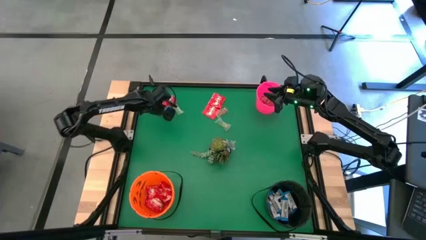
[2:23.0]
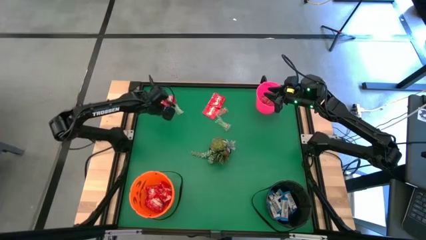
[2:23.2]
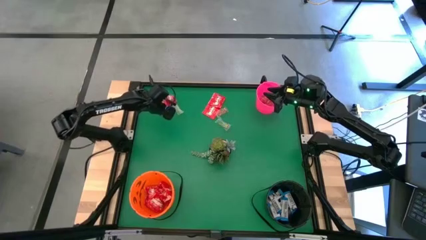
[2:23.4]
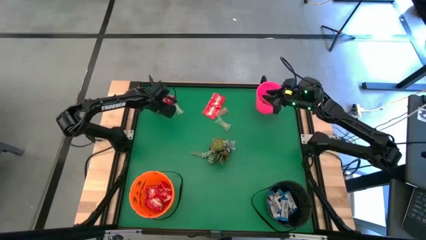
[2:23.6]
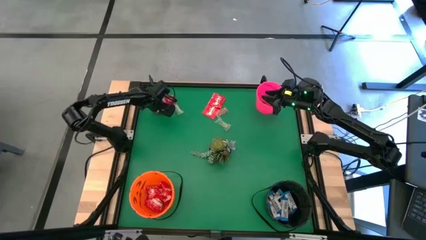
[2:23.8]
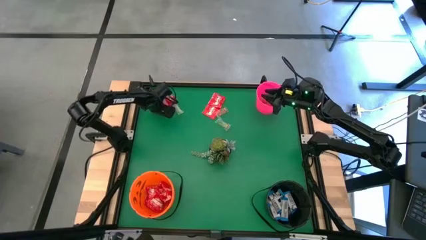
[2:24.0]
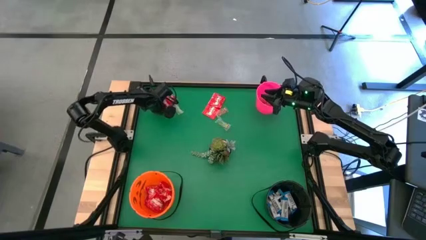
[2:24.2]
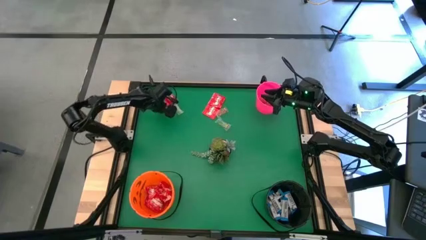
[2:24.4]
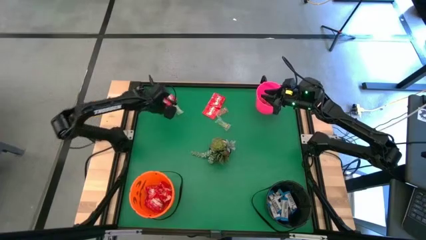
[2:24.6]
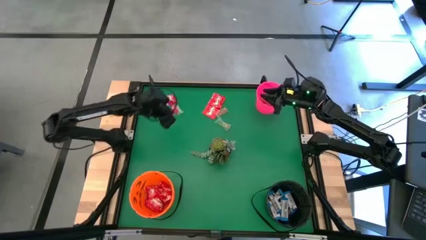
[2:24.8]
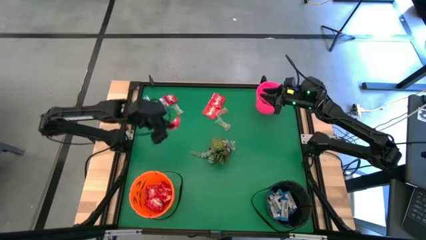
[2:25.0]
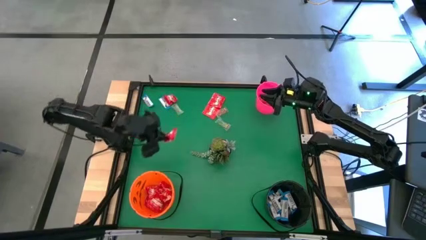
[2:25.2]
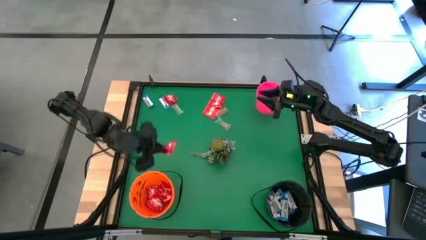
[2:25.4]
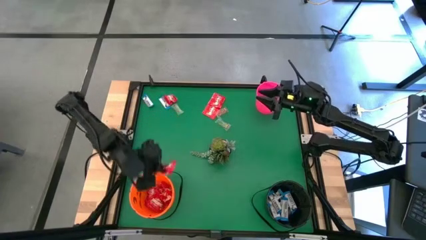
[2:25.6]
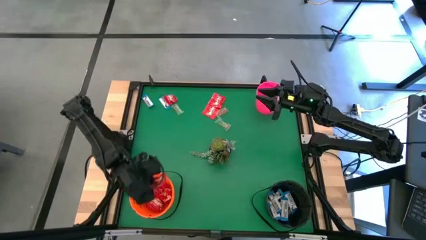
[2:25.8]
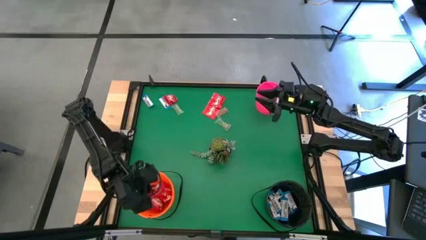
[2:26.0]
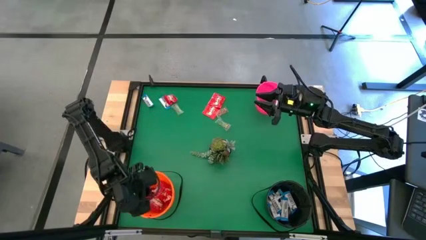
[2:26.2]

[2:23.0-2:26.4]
Task: Sort candy
Put the red candy into the orange bucket

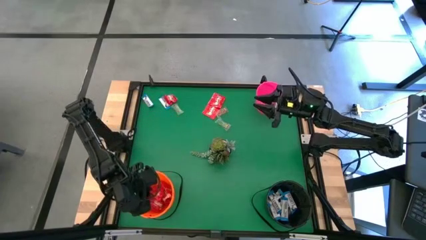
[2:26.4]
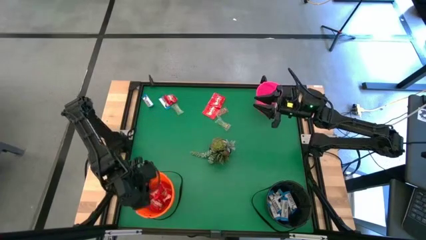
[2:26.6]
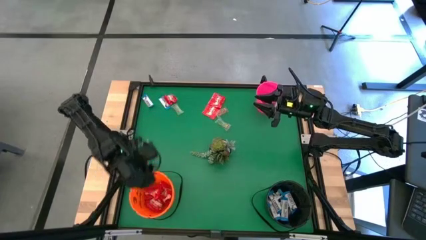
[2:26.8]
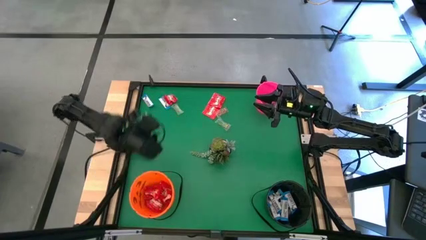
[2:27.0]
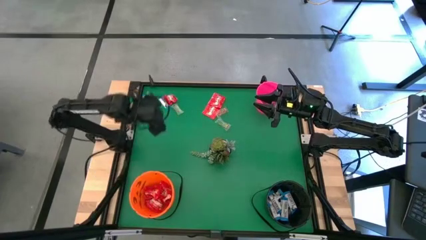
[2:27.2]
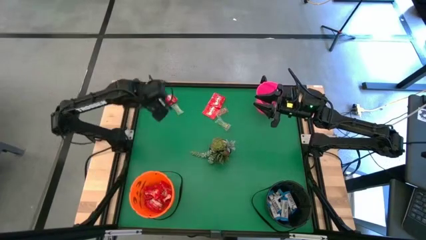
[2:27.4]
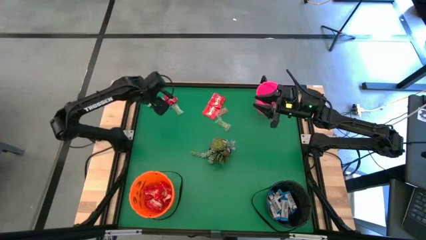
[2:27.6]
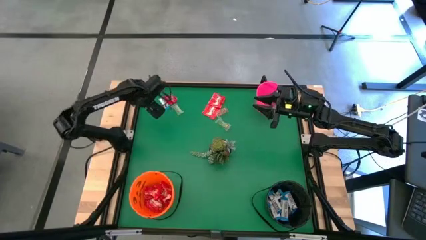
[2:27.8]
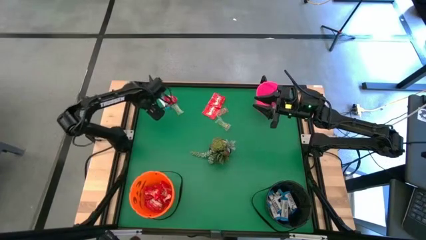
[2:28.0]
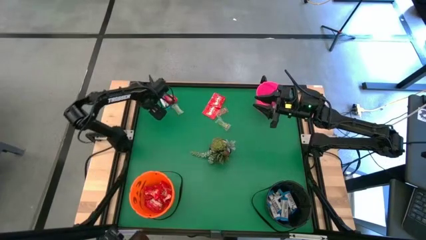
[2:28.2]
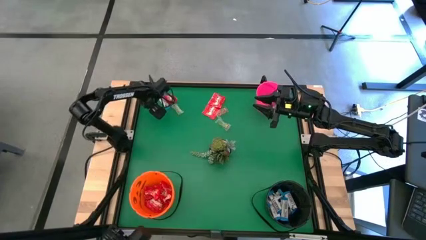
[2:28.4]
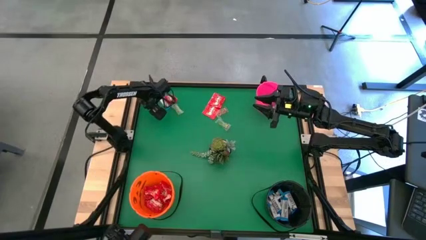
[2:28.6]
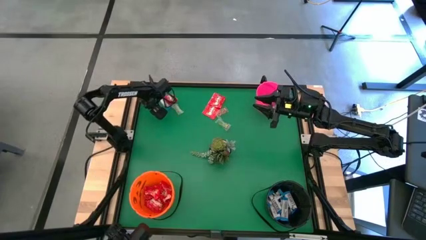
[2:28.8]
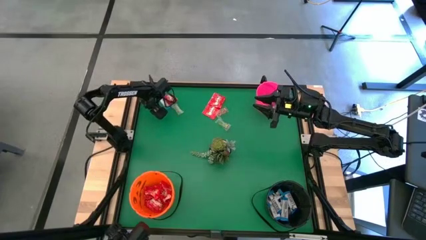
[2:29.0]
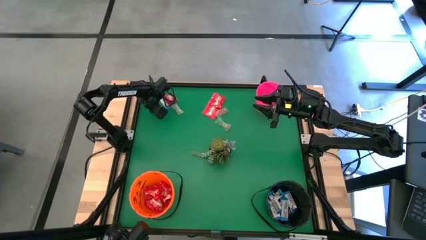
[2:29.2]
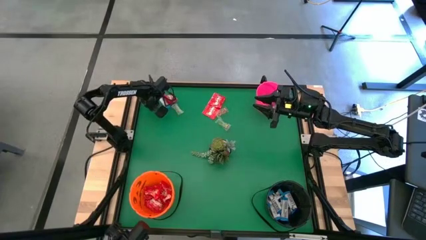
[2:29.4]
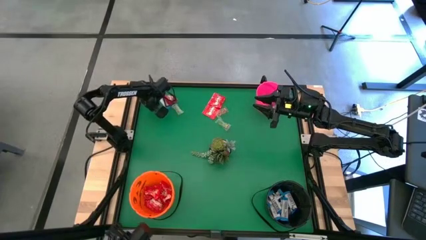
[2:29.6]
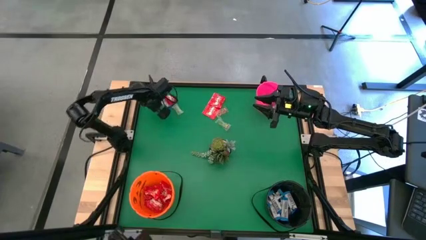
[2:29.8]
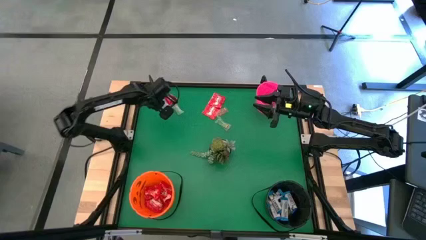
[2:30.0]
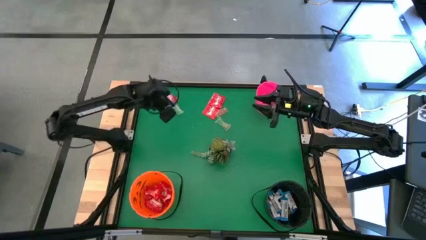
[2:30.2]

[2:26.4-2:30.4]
Put the white chocolate into the black bucket

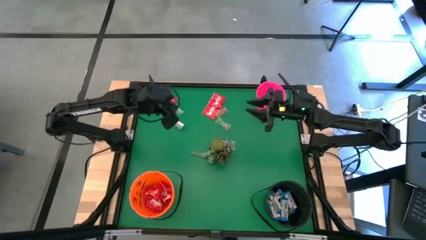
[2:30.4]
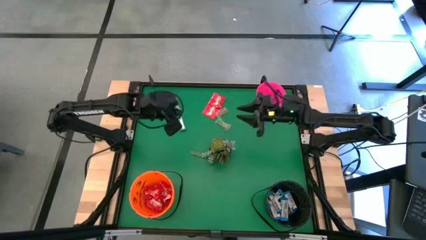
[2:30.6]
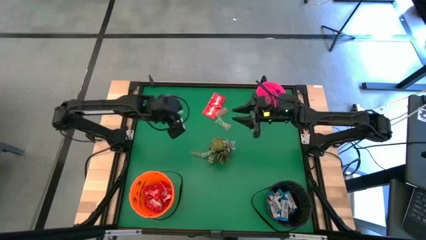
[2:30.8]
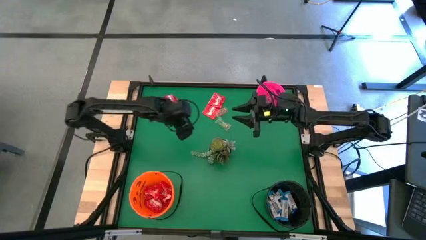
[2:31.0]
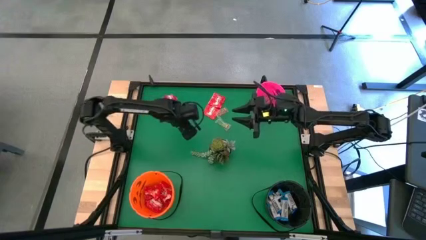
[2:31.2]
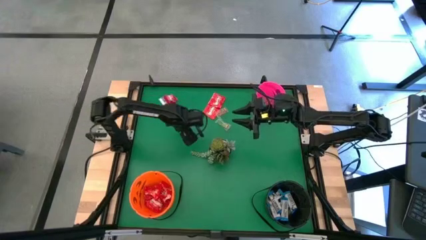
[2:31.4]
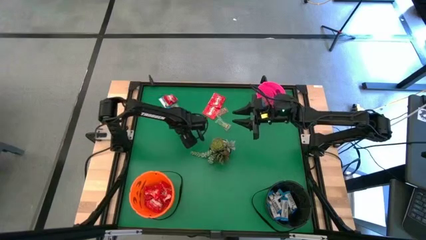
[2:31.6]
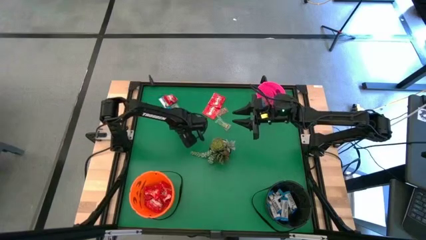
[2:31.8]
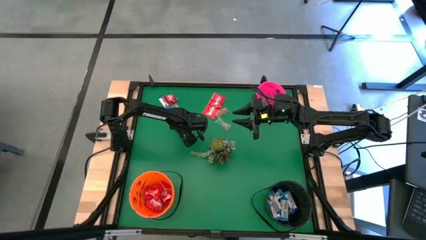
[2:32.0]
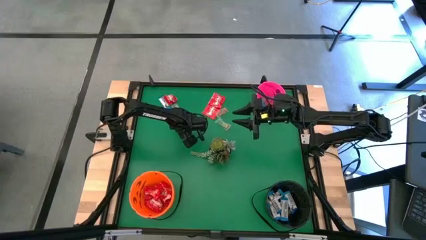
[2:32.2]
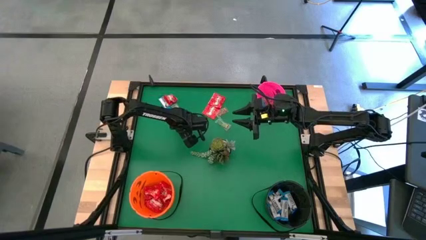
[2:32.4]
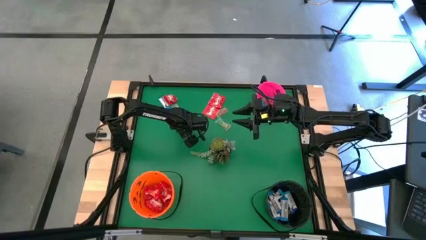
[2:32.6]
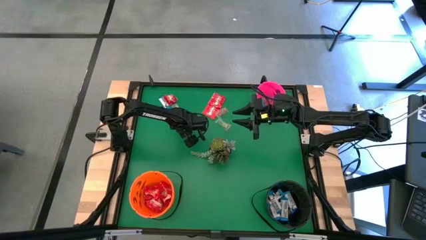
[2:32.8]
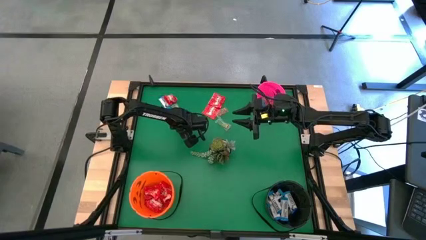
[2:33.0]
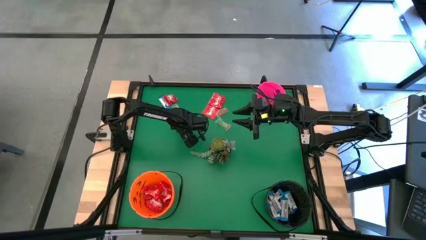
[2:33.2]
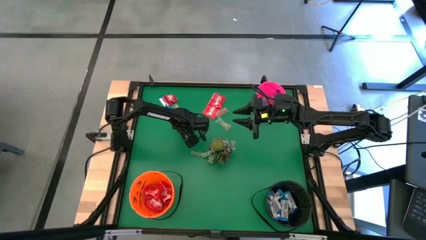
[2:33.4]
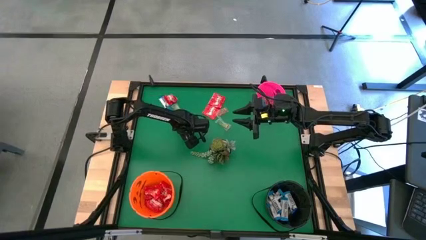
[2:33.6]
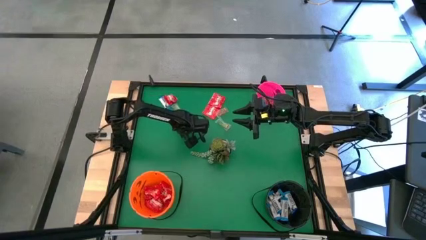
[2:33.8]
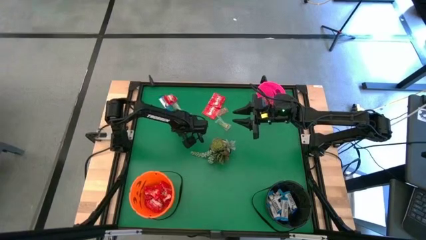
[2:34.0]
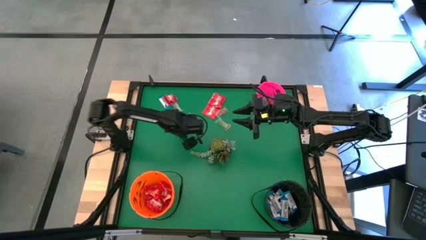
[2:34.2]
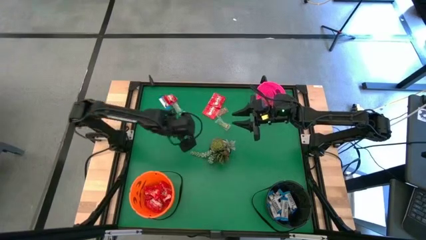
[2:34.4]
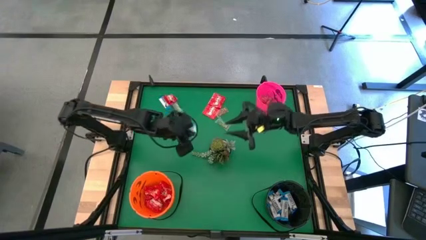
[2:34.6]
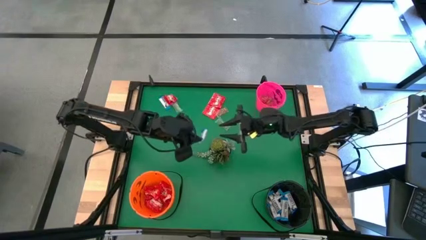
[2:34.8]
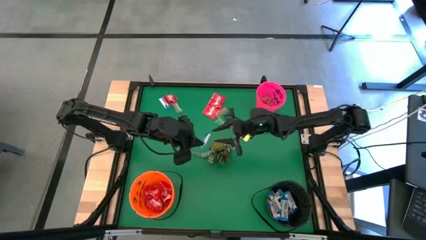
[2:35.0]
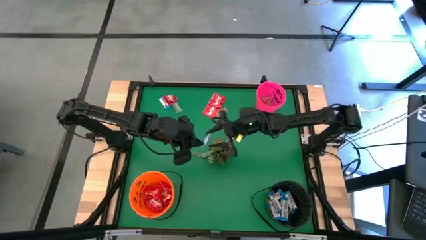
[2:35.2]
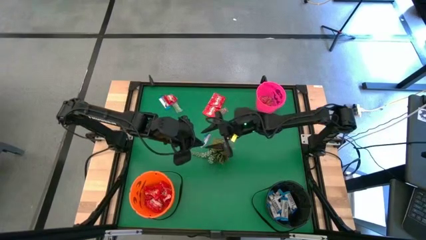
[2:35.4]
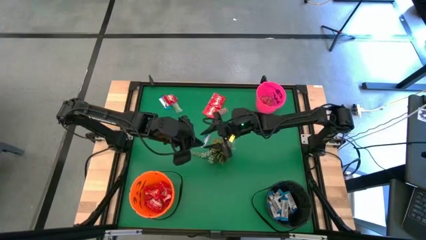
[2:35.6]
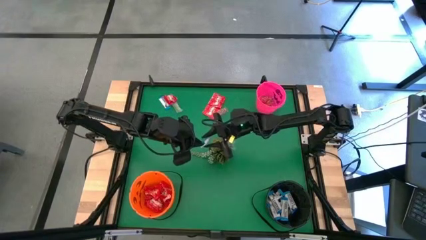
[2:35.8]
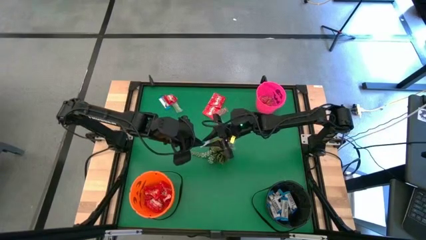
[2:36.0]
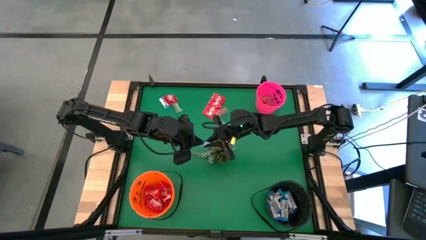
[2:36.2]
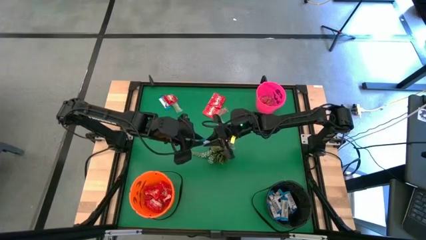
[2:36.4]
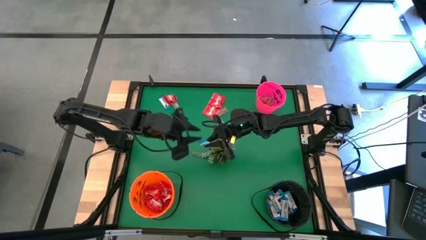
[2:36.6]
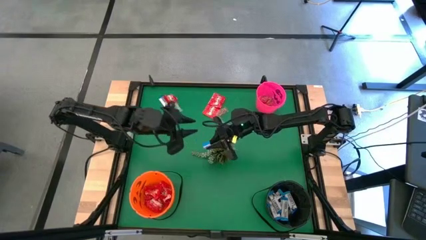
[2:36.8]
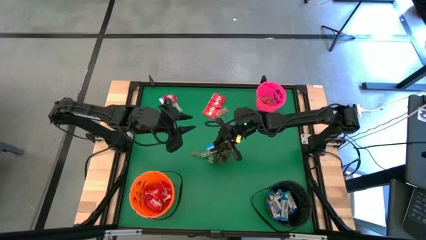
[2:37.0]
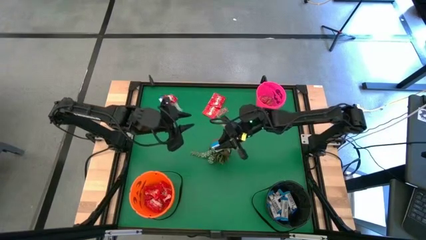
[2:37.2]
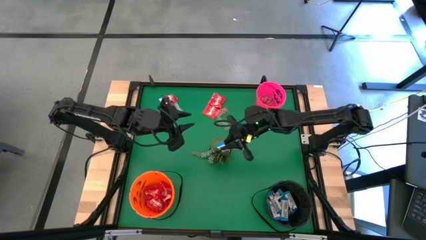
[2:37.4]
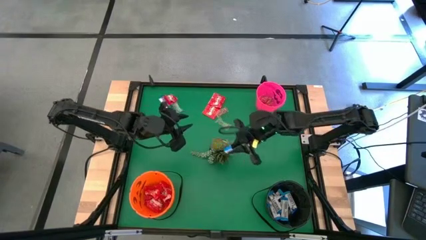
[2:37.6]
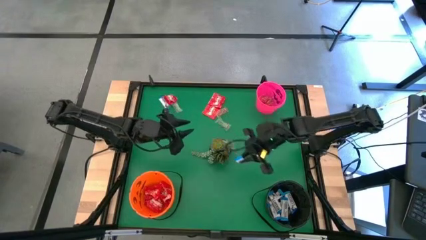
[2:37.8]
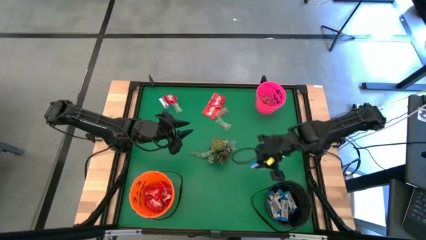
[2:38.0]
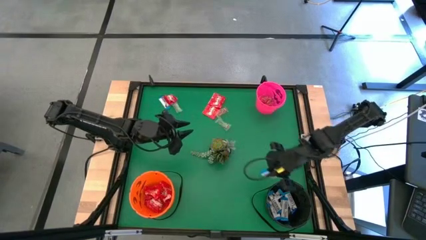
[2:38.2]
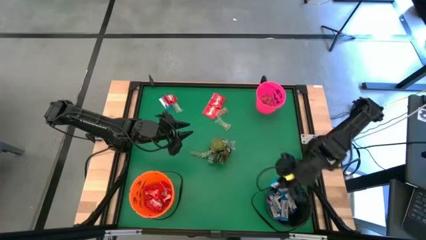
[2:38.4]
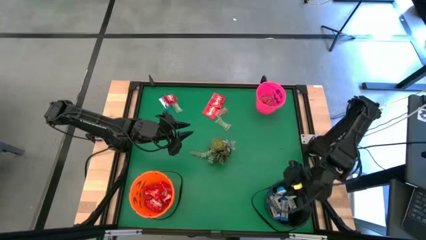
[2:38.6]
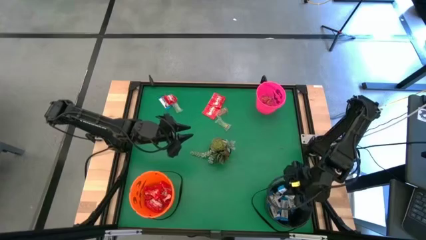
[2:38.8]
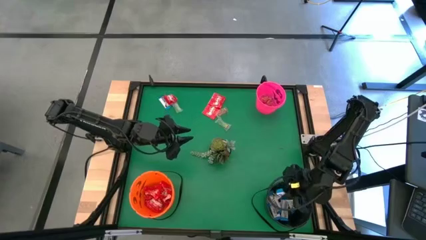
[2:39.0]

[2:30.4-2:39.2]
Put the white chocolate into the black bucket

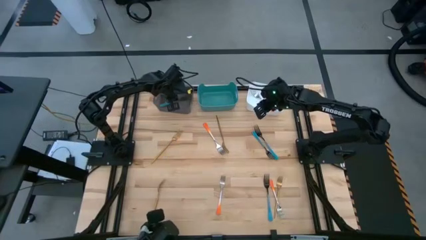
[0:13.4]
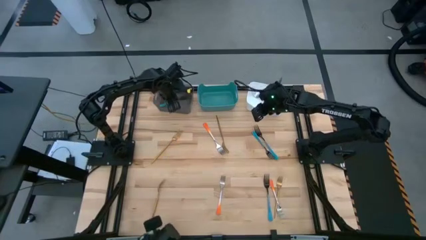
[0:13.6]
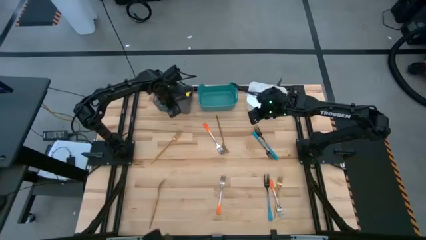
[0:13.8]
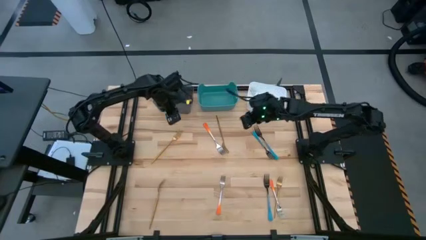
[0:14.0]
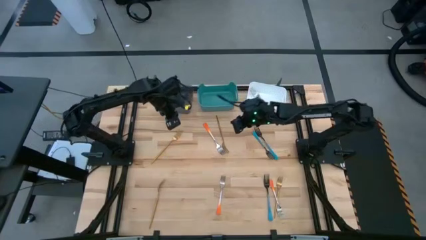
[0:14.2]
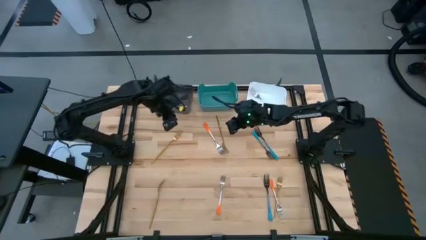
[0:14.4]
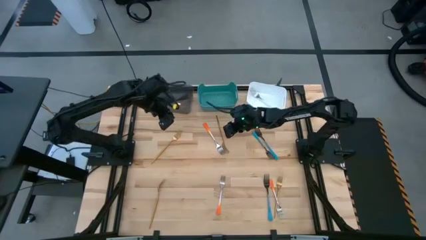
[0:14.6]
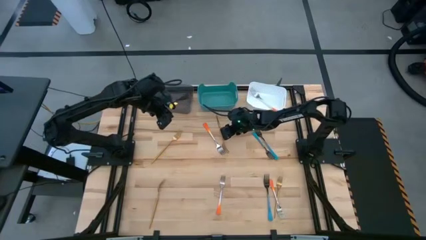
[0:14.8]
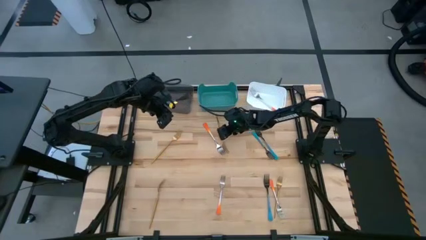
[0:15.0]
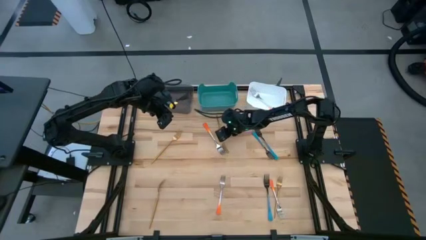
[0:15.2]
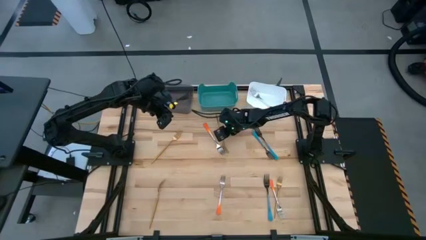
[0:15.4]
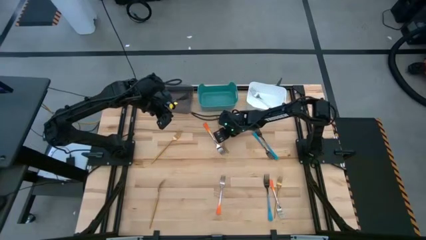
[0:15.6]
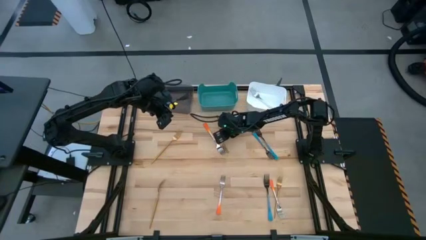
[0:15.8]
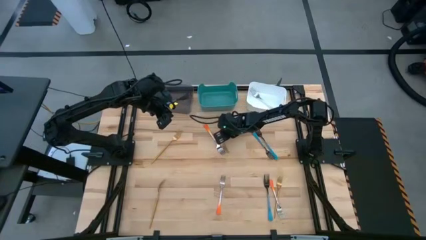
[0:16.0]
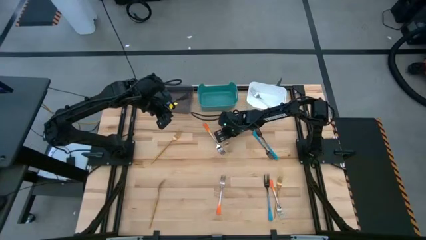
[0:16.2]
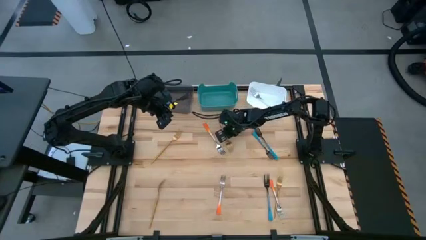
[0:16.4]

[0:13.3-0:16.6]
Task: Sort silverware by color (type)
Put the gold fork into the green bin
